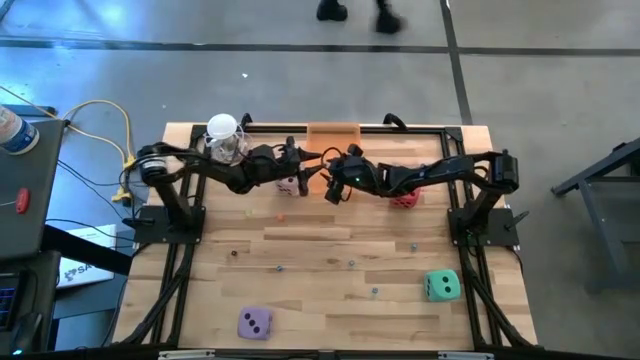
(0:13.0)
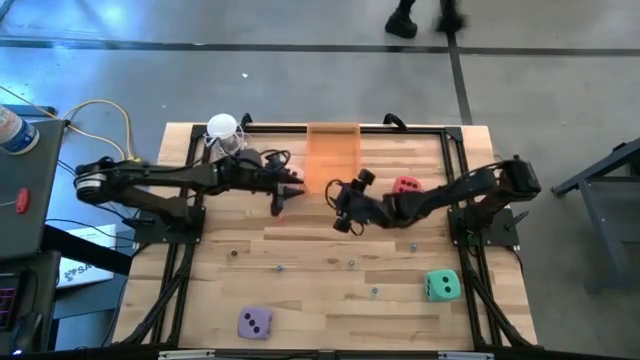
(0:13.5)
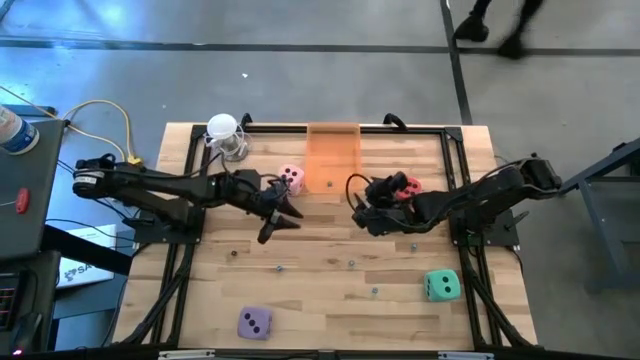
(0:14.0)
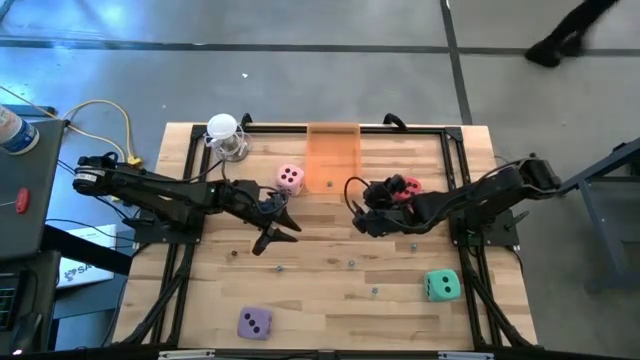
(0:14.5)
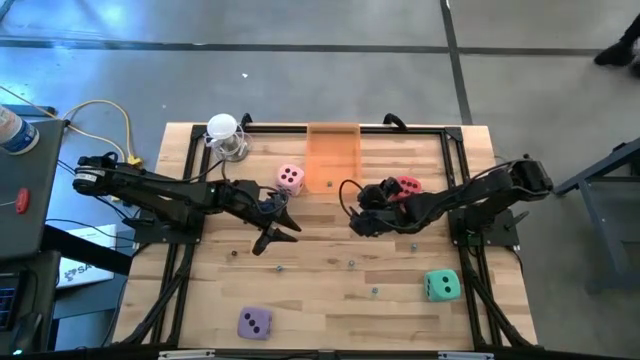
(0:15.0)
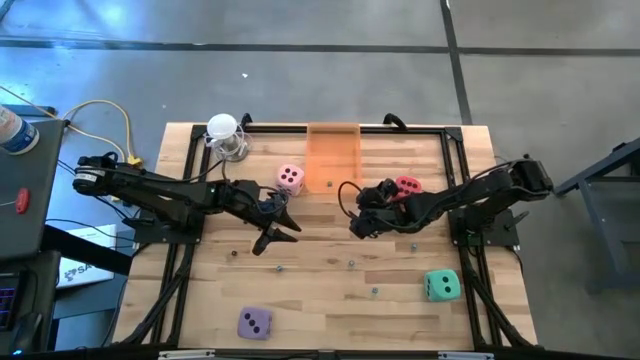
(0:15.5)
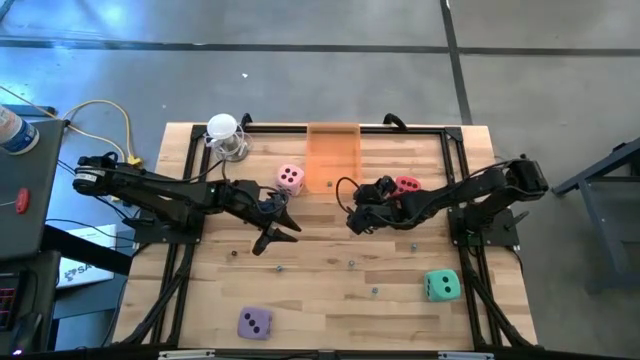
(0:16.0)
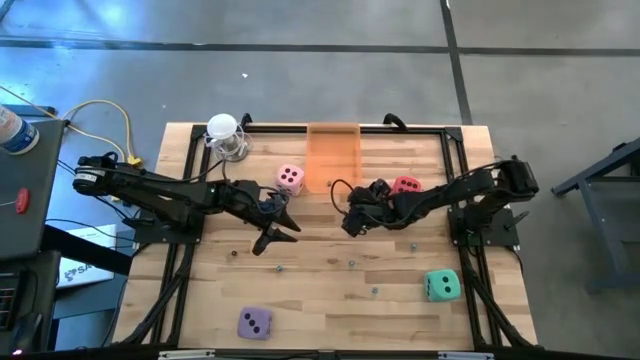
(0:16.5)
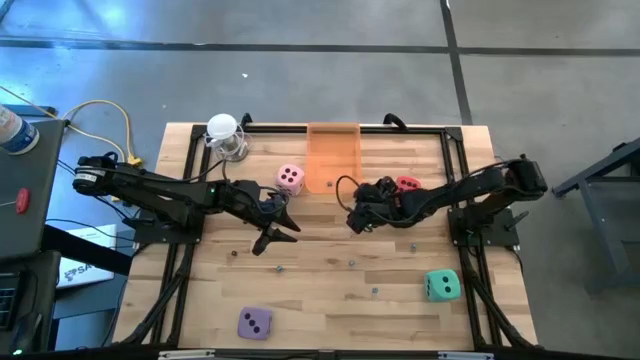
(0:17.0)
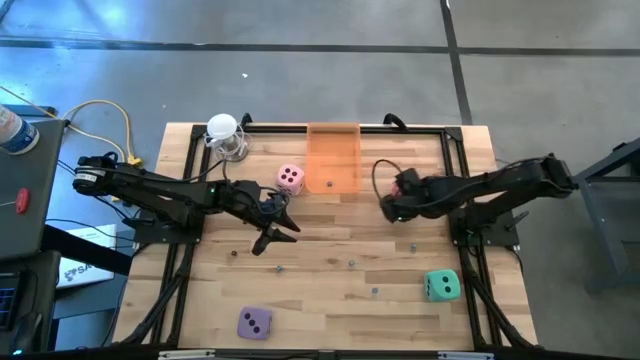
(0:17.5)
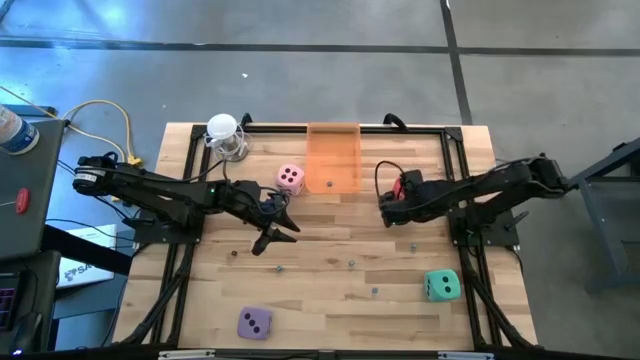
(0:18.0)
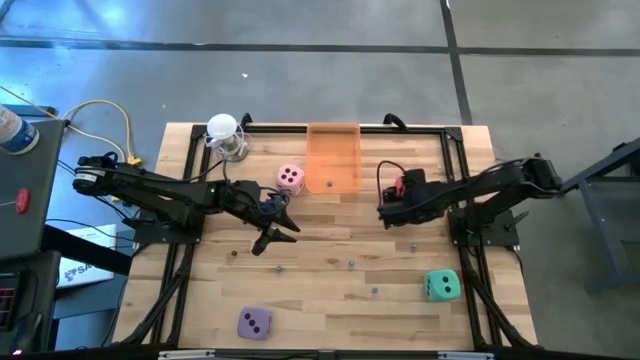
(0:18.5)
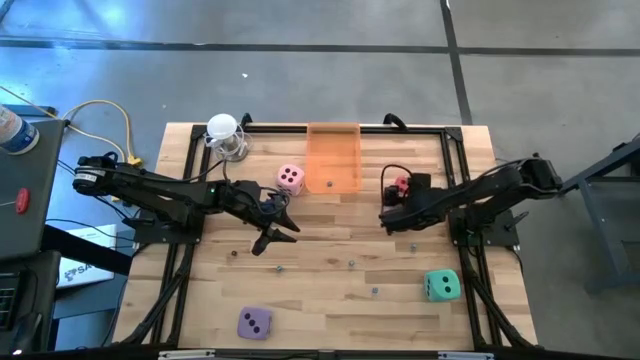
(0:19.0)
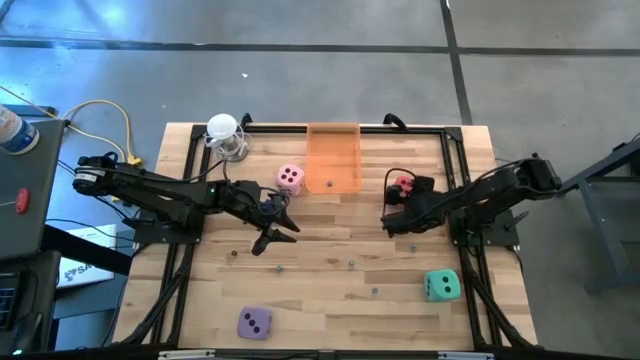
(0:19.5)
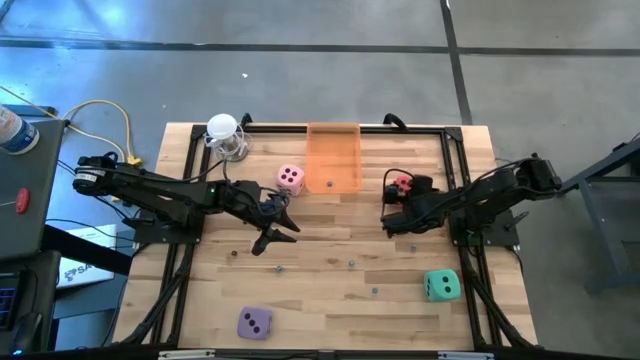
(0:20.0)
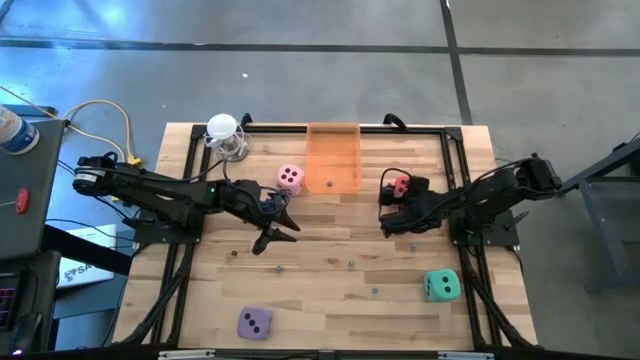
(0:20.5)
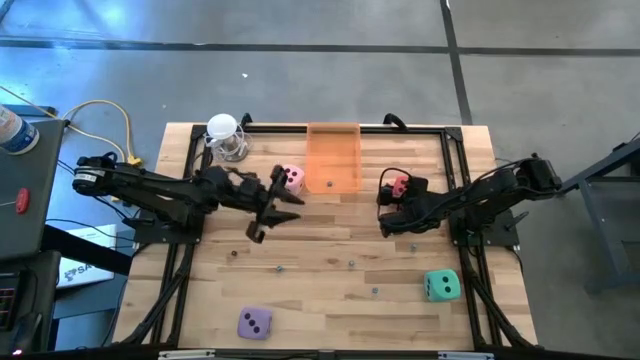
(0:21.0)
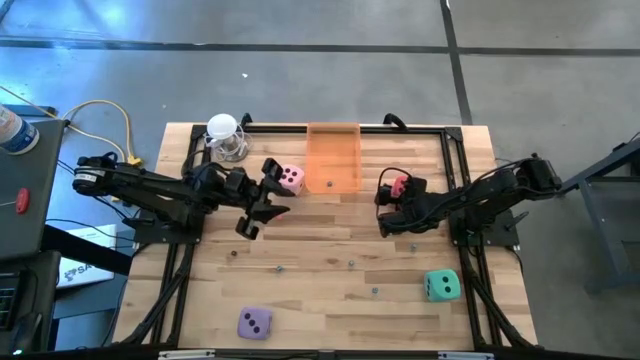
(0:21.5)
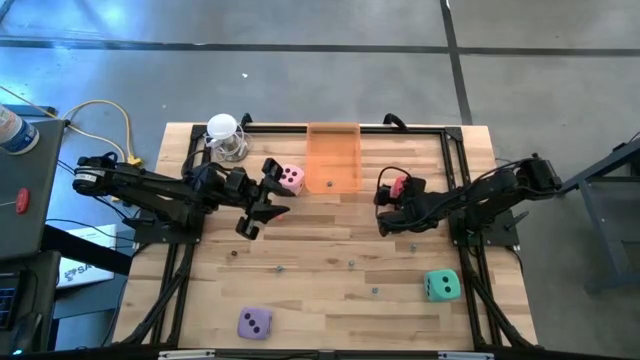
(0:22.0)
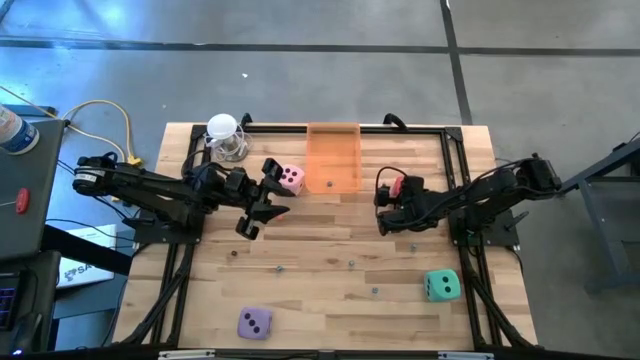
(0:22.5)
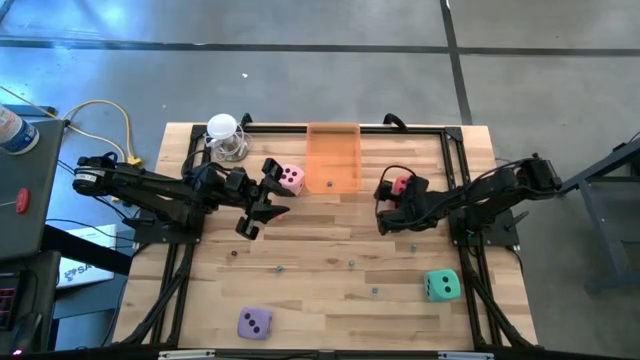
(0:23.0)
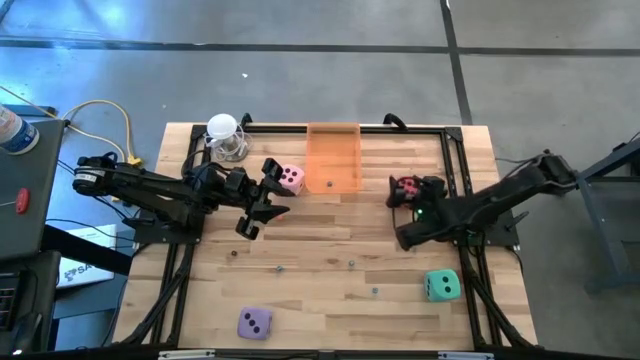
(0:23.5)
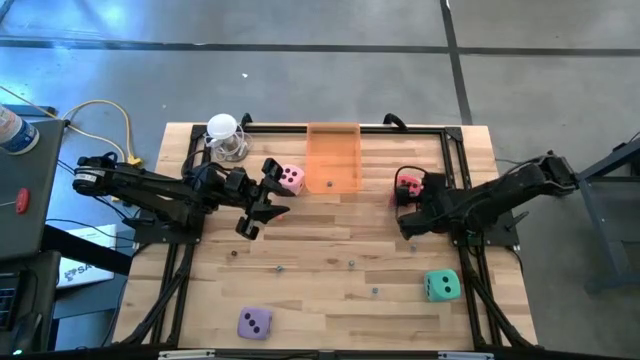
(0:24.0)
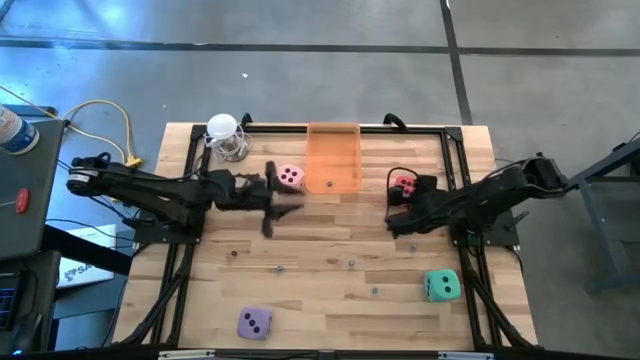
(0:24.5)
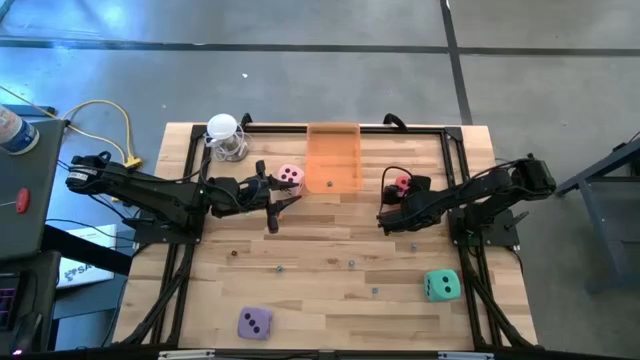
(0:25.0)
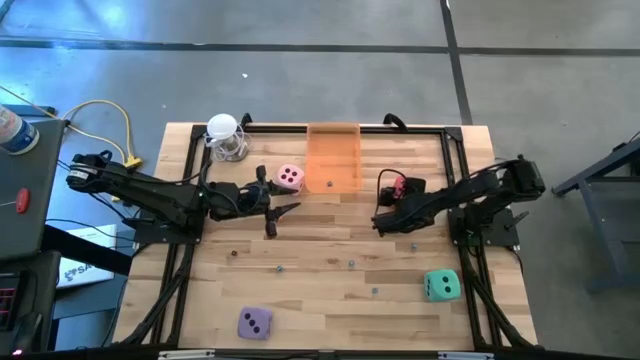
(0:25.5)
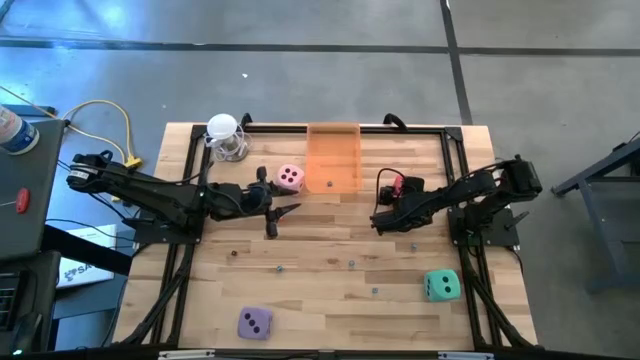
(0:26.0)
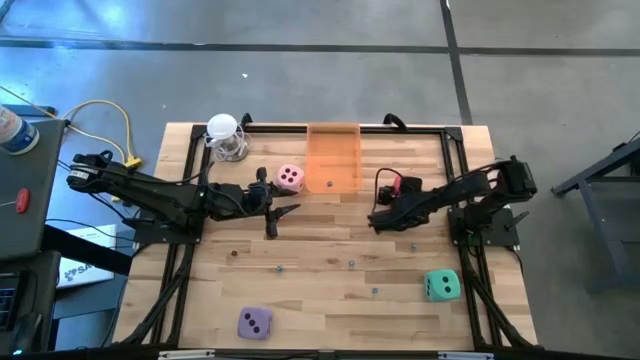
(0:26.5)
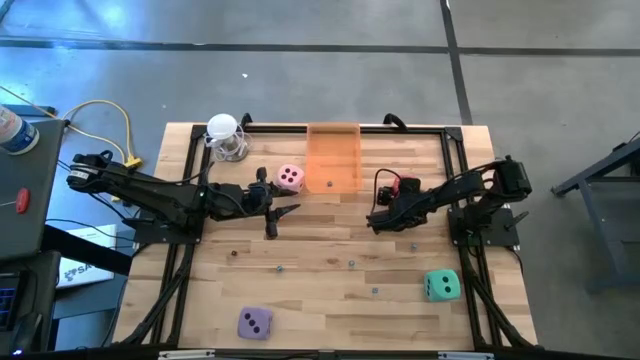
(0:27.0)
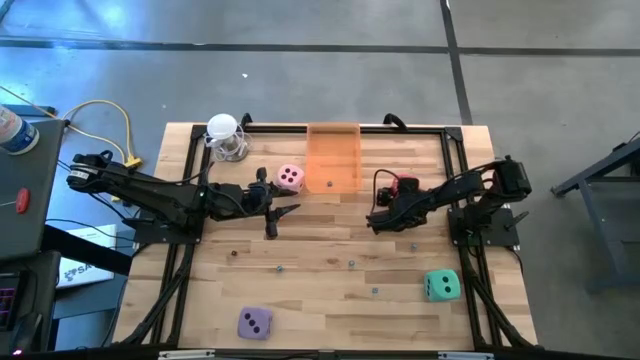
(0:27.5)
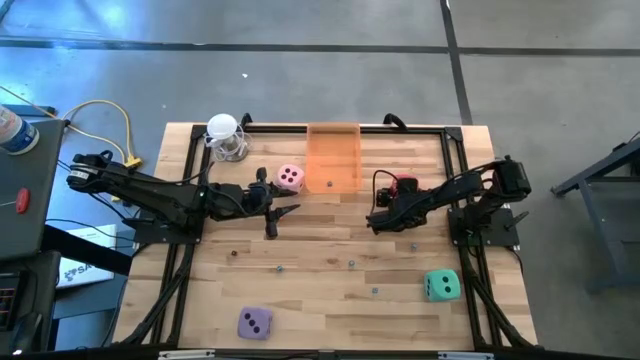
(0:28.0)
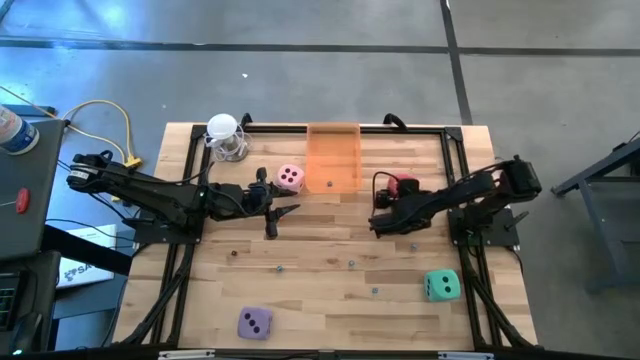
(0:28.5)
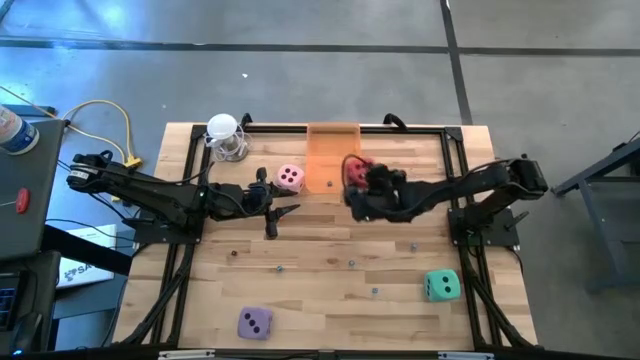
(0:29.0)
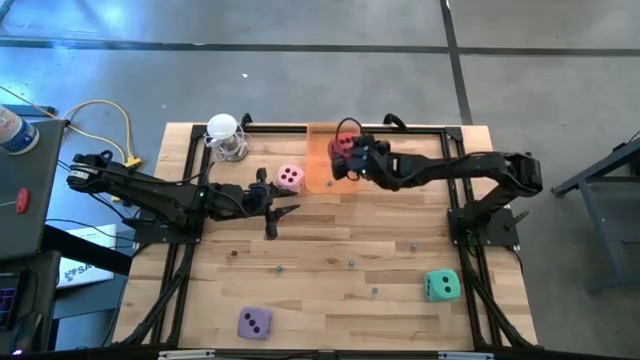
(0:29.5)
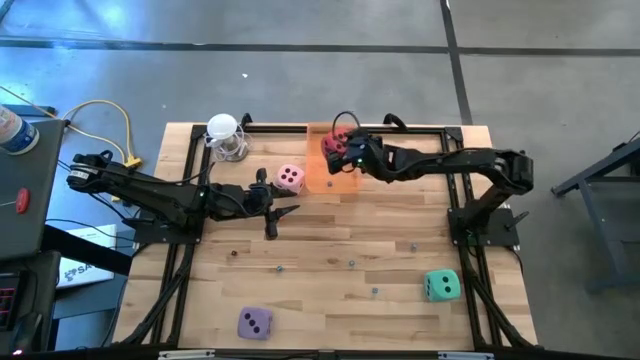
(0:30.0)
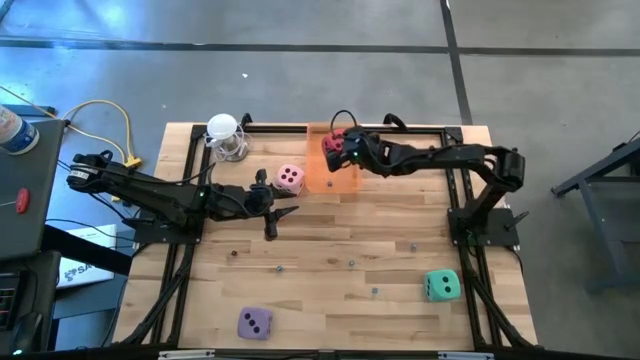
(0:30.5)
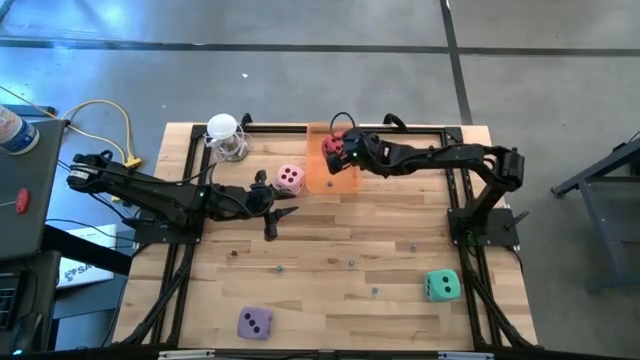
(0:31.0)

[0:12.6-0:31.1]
Task: Pick & Place Dice
Put the red die into the orange bin

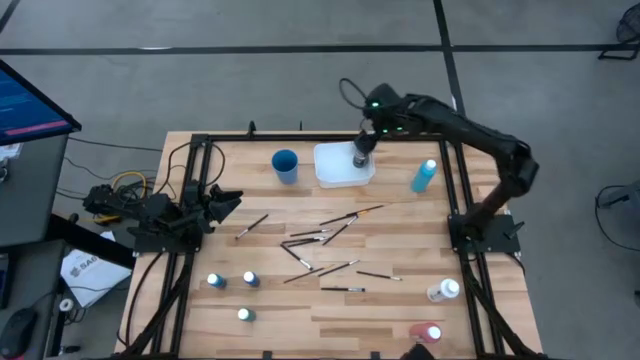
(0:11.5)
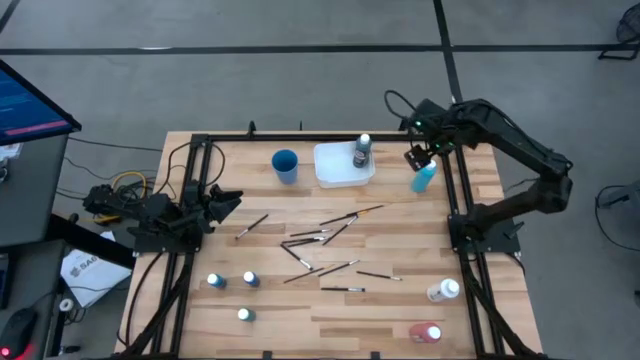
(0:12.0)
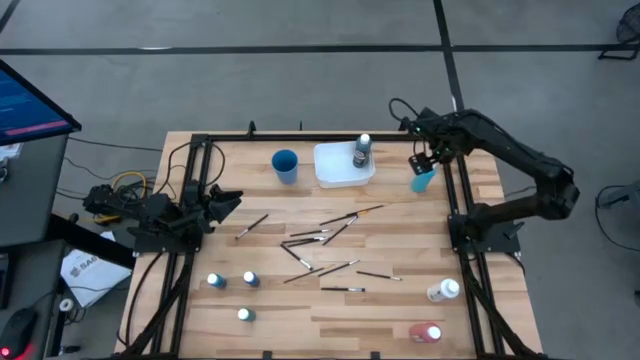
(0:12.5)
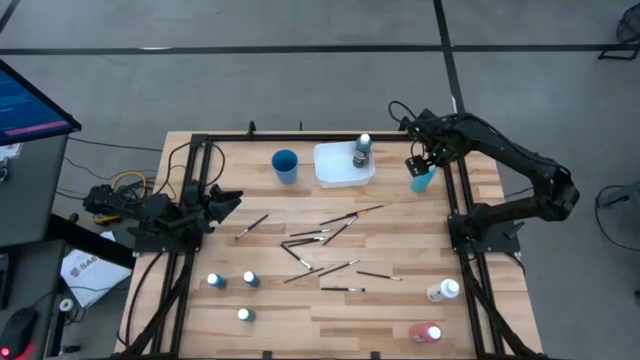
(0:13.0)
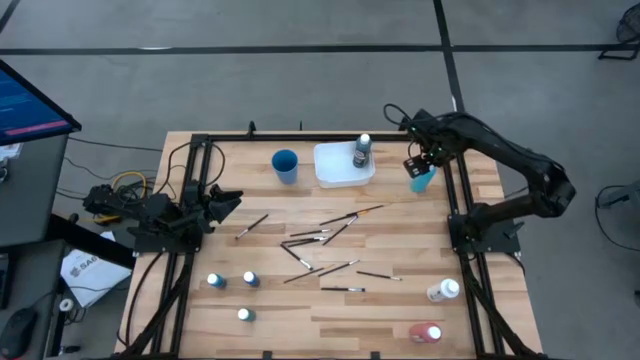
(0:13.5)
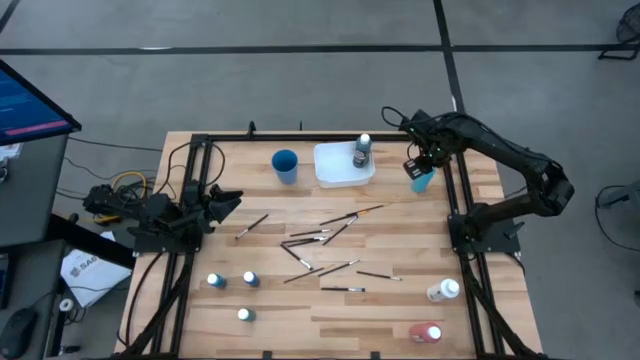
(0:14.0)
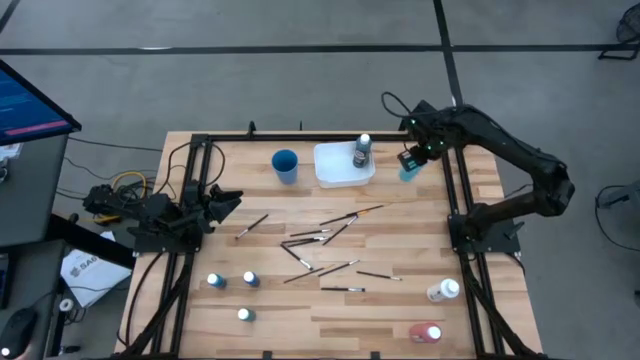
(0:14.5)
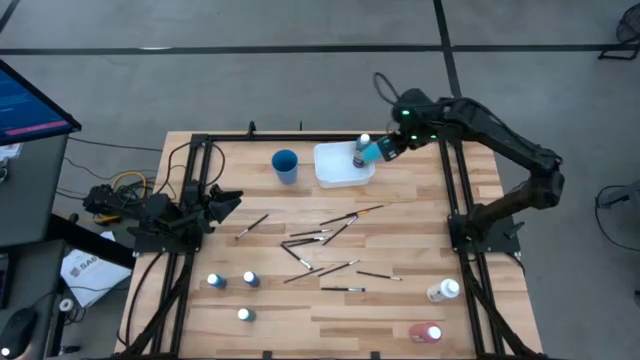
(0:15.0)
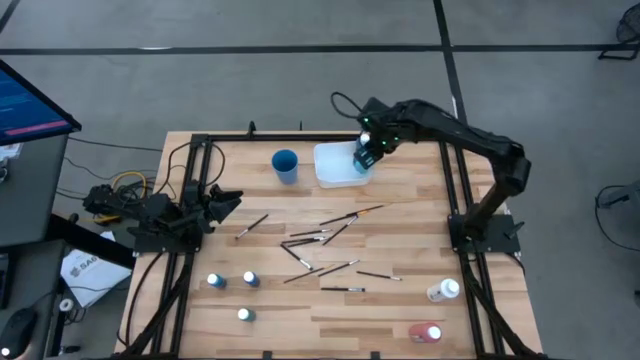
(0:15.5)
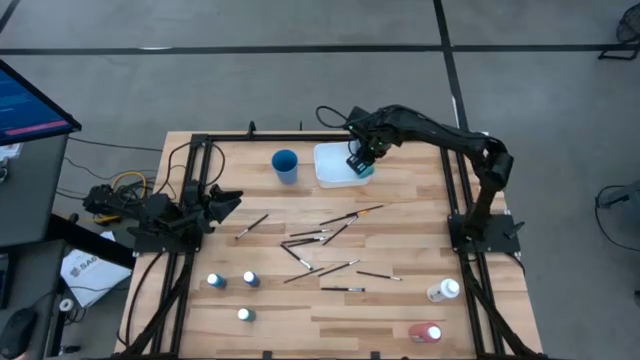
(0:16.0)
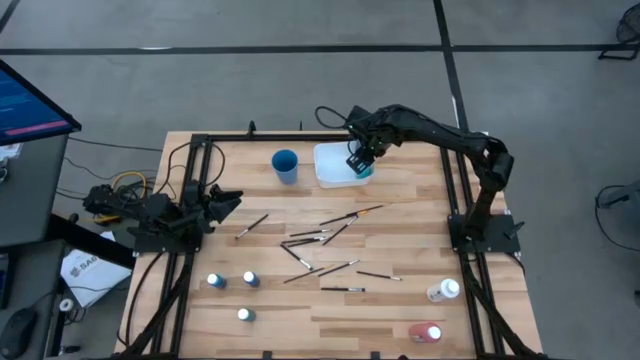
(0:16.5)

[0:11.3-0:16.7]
Task: Pick & Place Paint Supplies
Put the light blue paint bottle into the white bin
